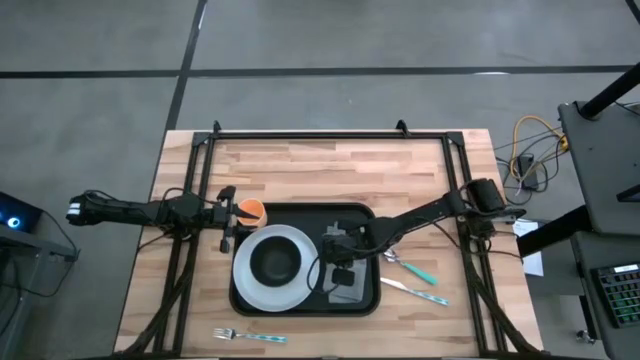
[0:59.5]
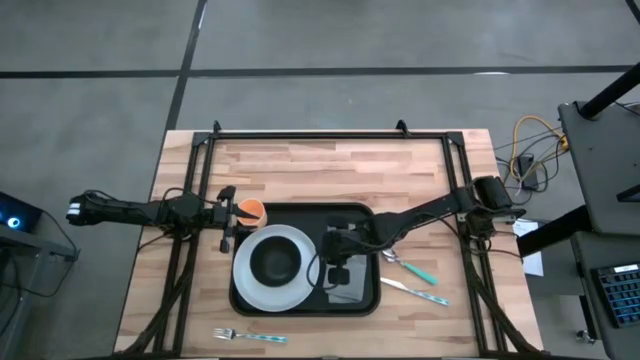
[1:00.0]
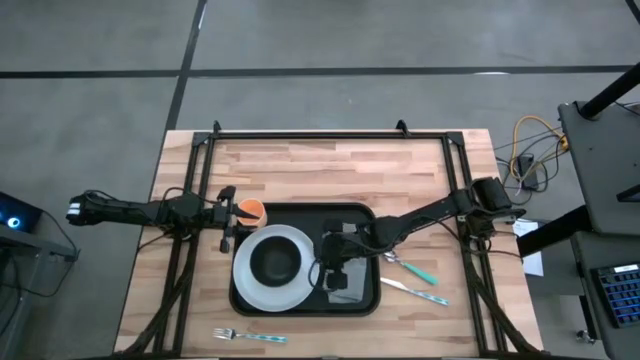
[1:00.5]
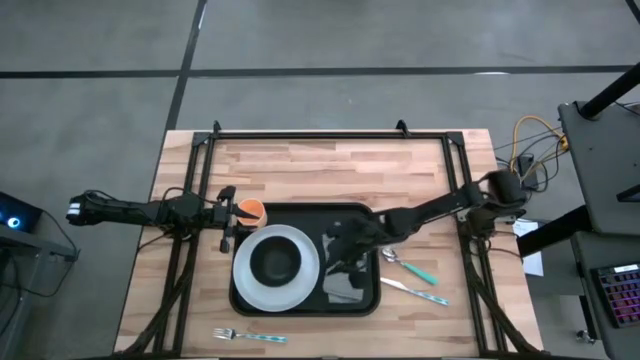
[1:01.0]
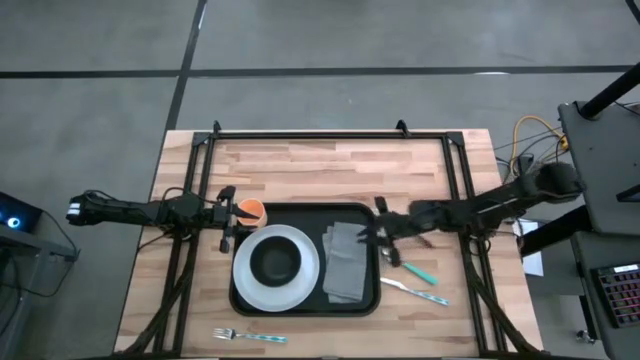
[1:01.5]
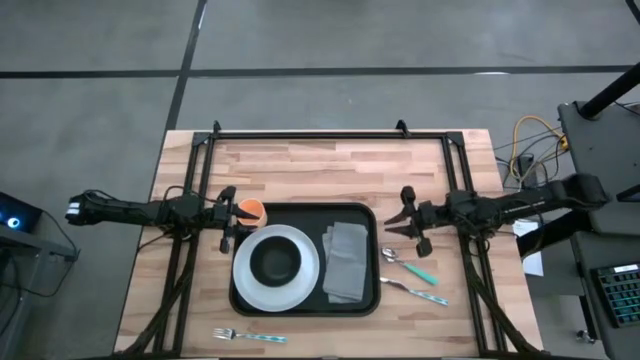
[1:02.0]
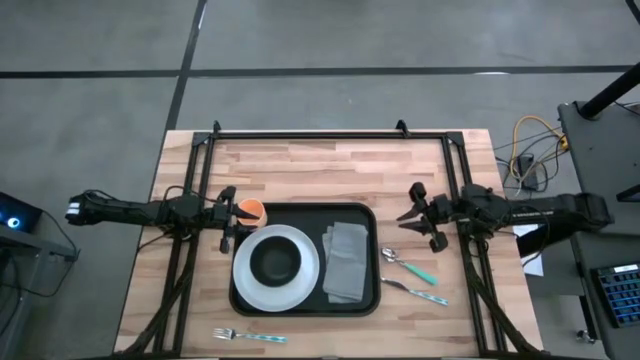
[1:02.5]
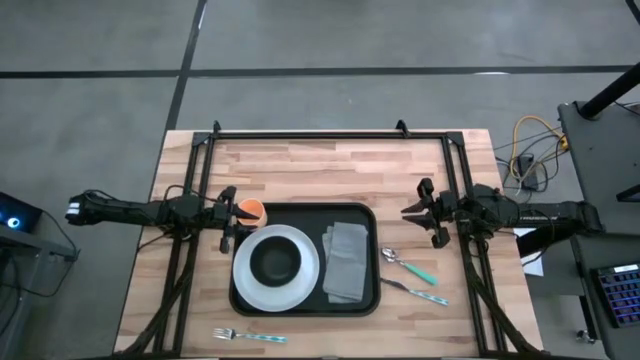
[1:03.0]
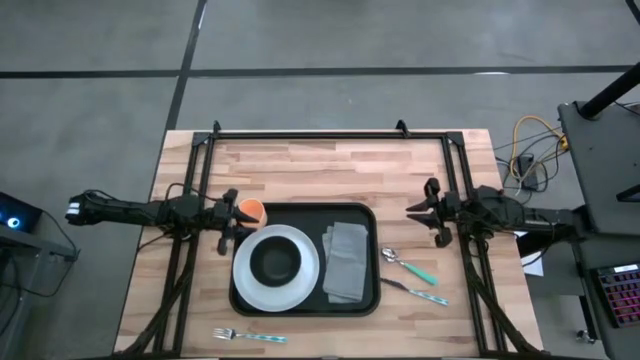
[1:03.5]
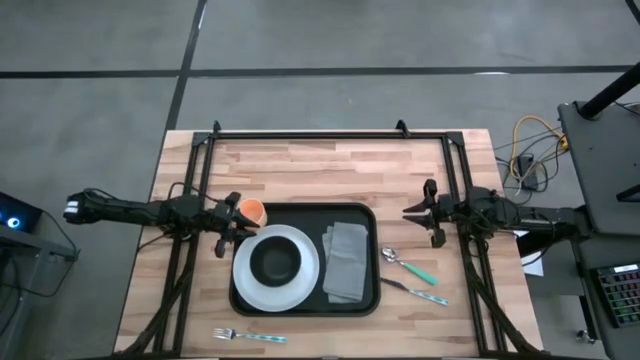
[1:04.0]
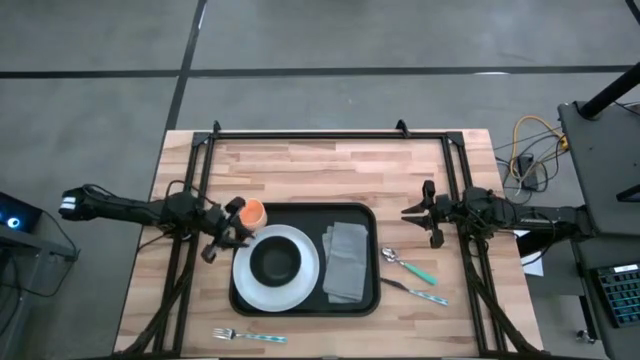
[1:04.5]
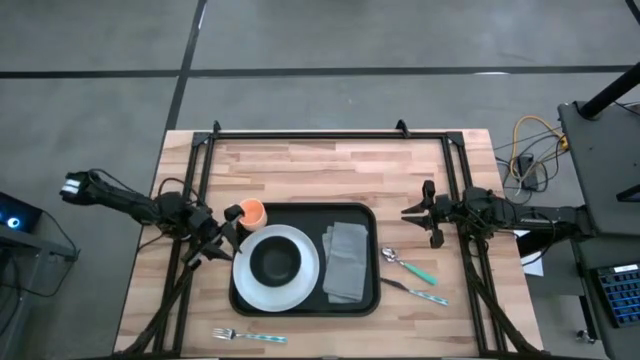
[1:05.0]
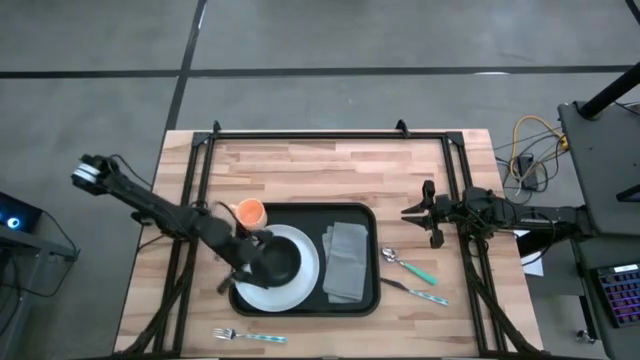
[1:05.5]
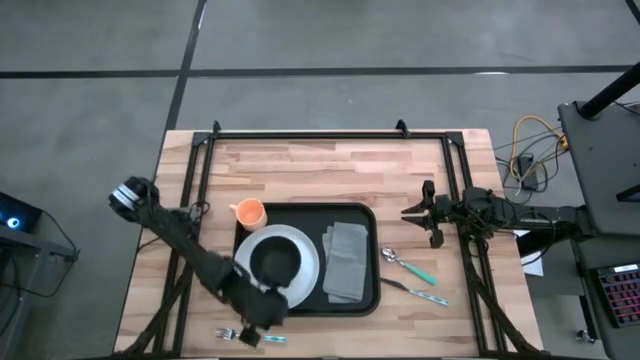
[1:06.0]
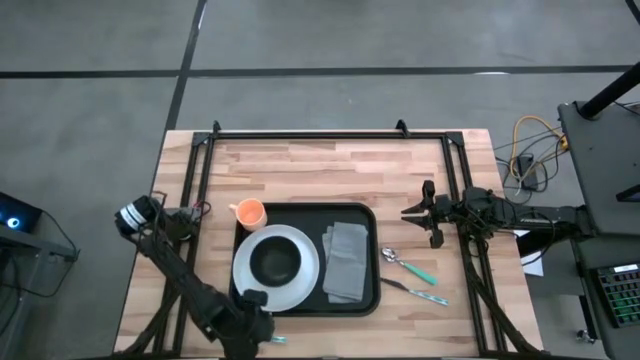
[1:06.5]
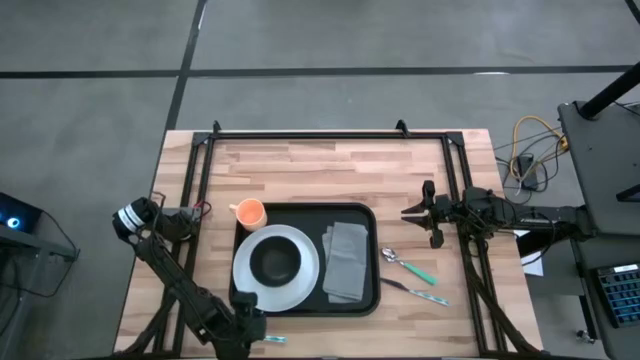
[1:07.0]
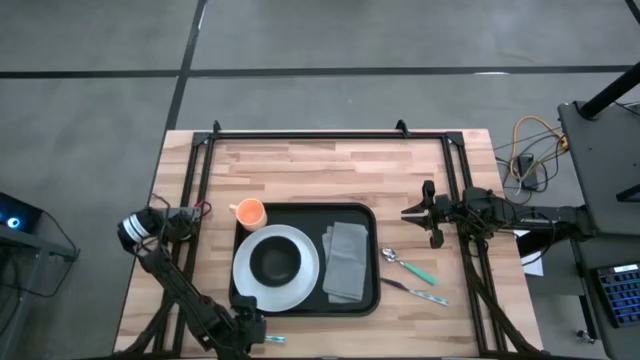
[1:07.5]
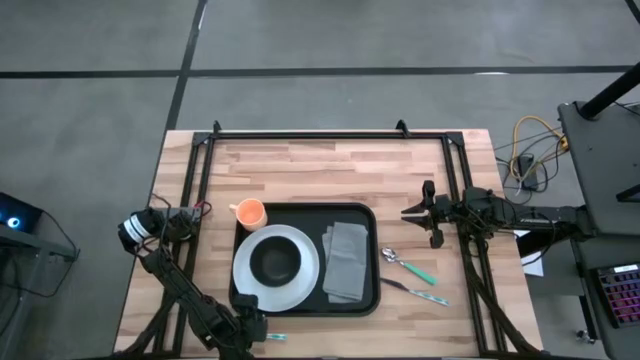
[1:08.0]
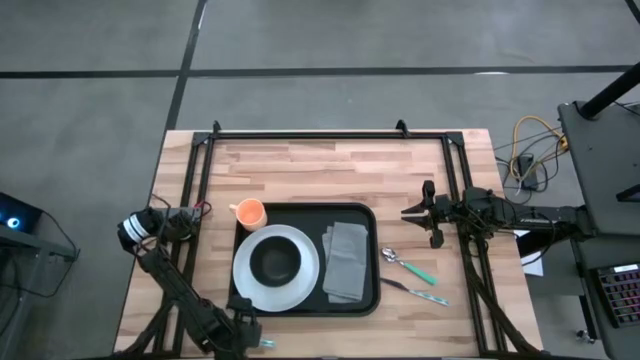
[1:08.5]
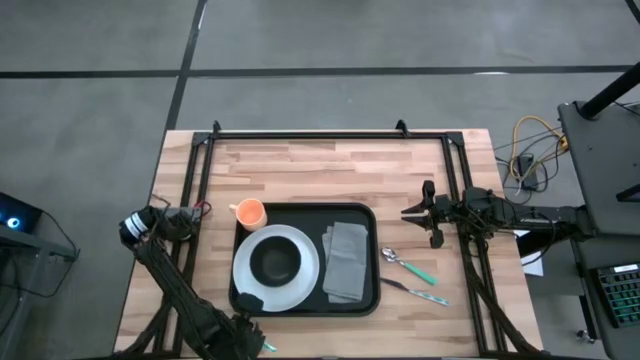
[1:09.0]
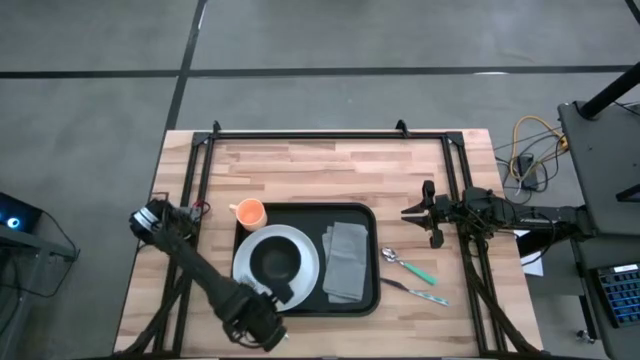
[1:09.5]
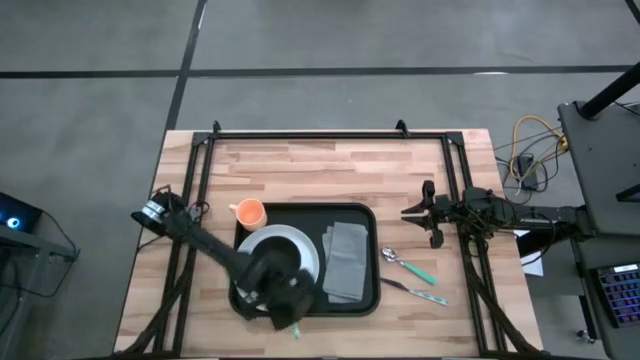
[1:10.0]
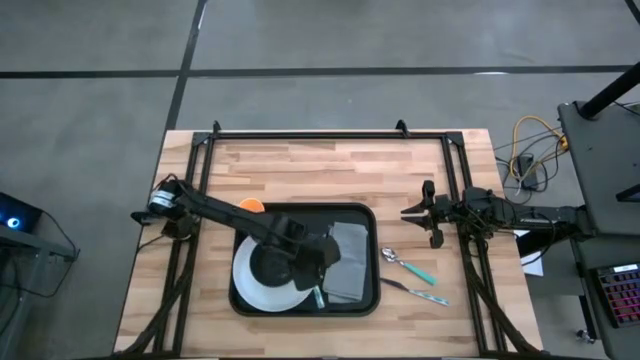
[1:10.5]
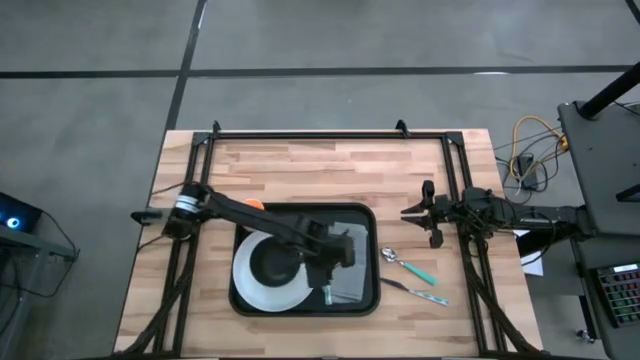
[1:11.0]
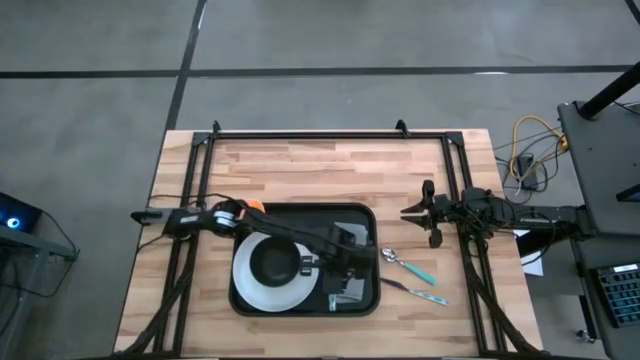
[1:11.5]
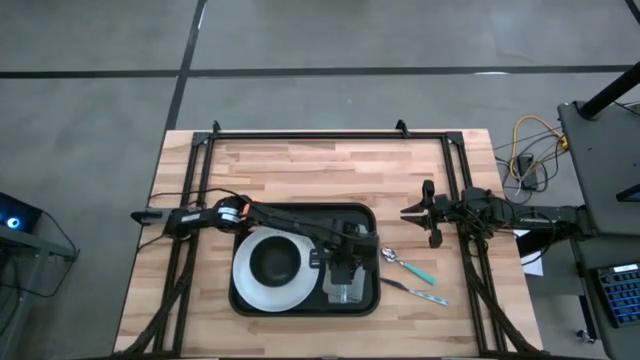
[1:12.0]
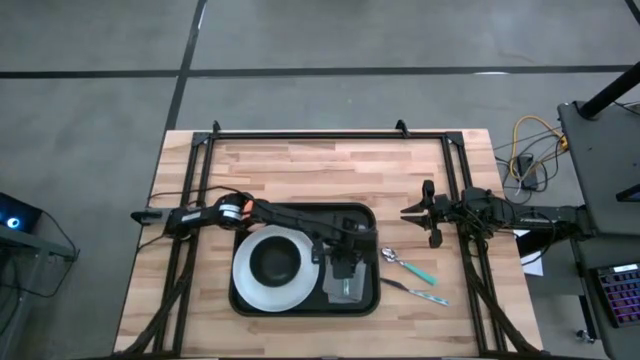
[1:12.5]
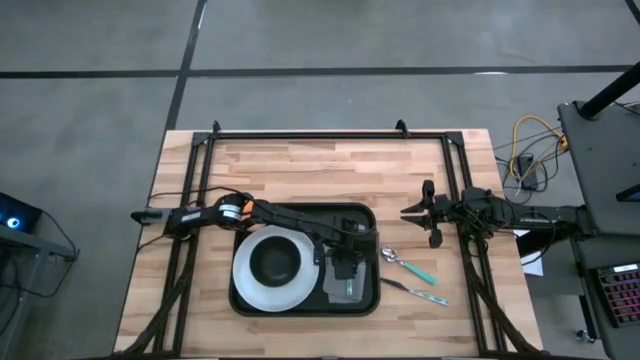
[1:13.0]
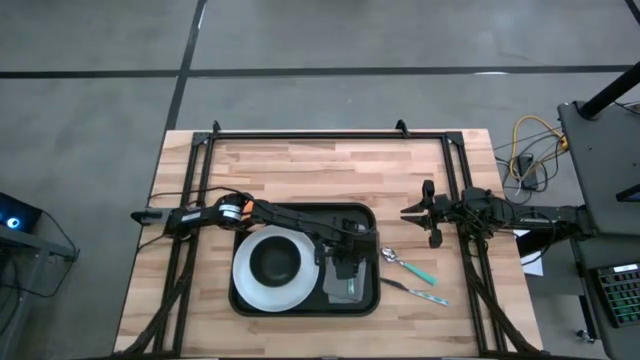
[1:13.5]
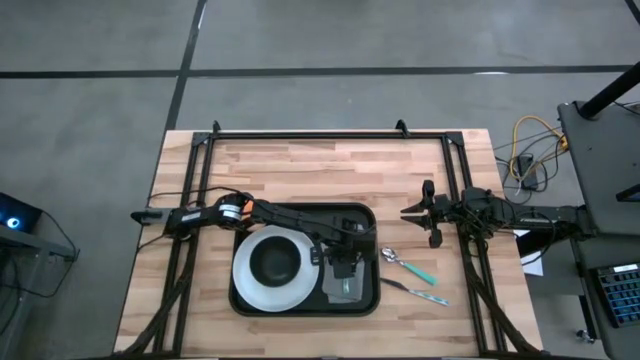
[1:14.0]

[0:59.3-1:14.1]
Task: Set up tray
Put the fork on the table napkin

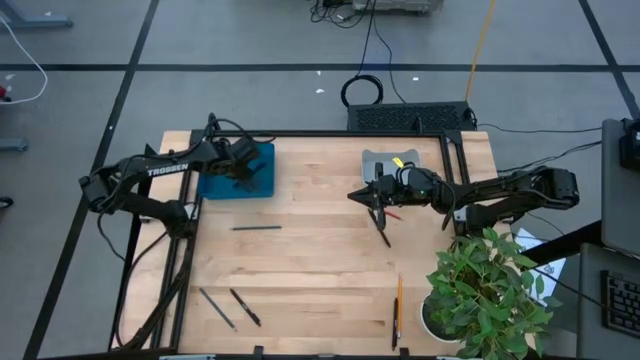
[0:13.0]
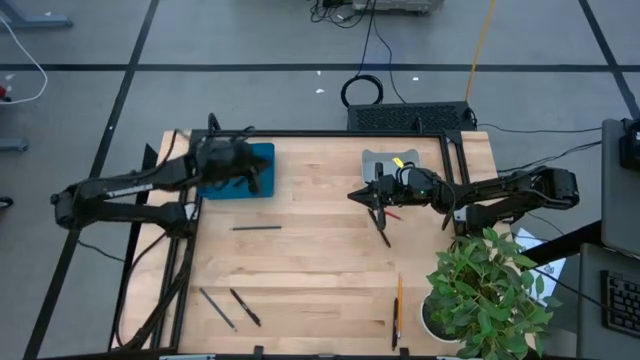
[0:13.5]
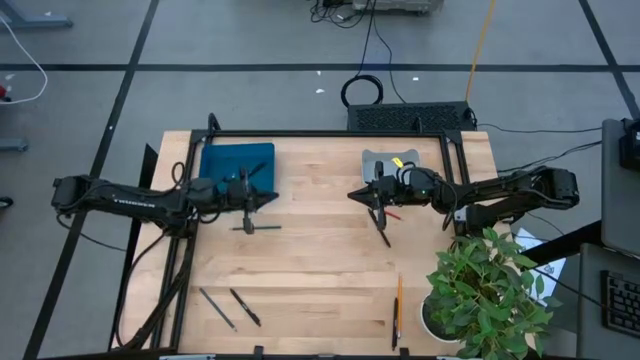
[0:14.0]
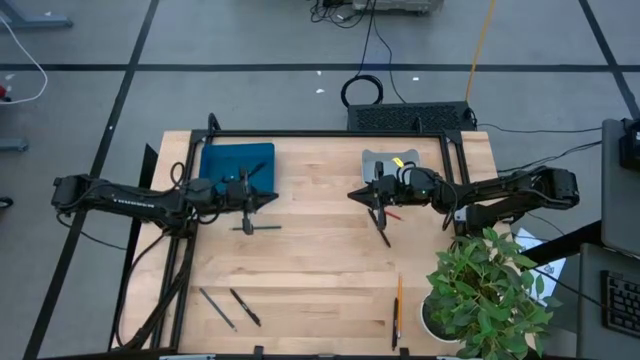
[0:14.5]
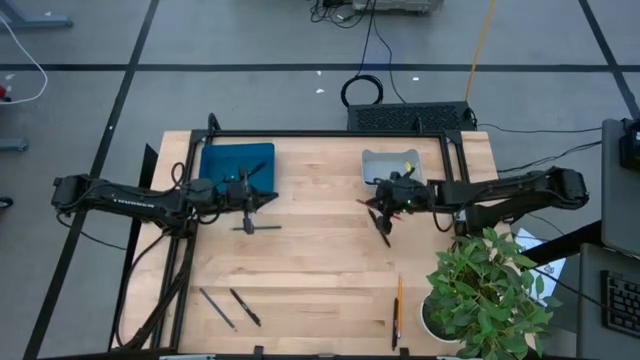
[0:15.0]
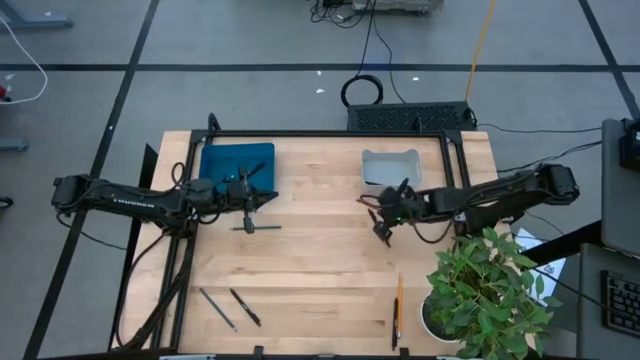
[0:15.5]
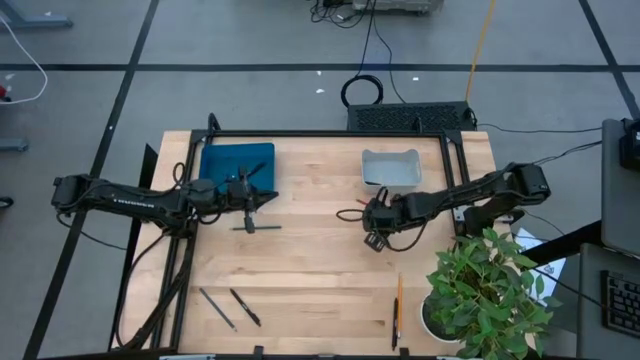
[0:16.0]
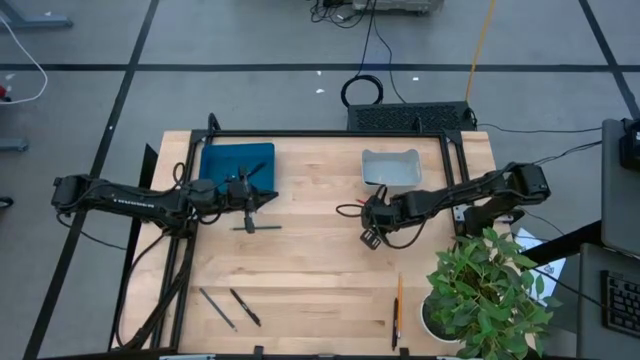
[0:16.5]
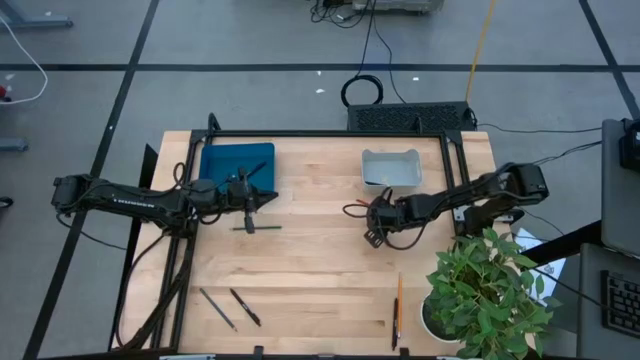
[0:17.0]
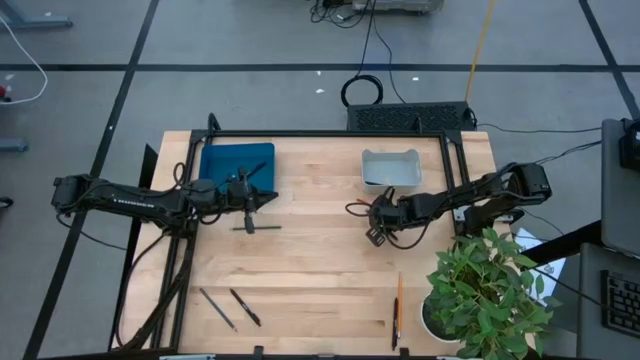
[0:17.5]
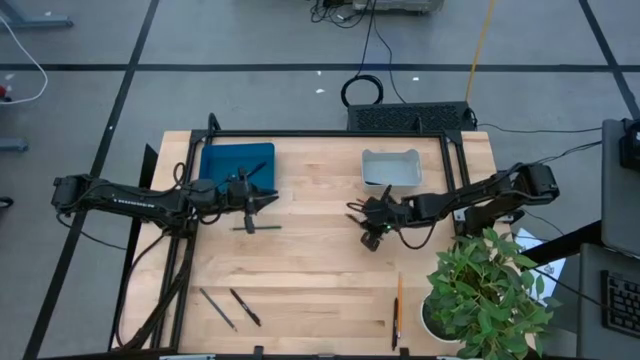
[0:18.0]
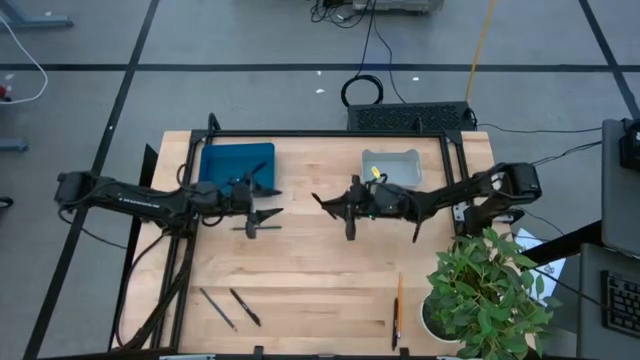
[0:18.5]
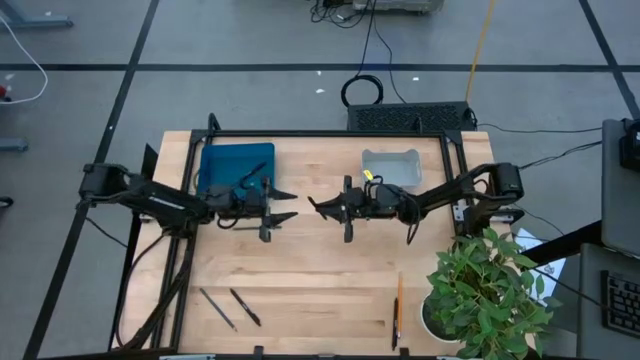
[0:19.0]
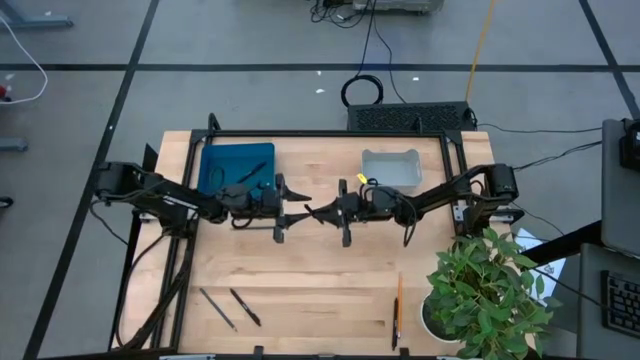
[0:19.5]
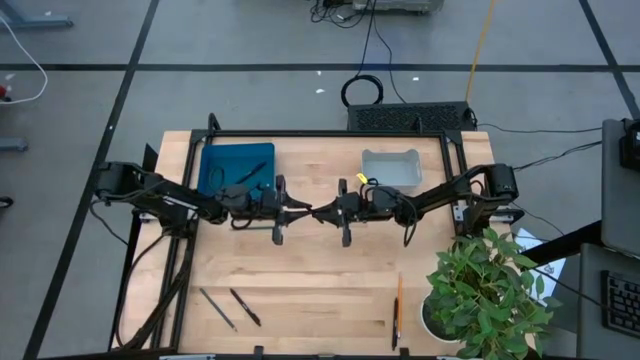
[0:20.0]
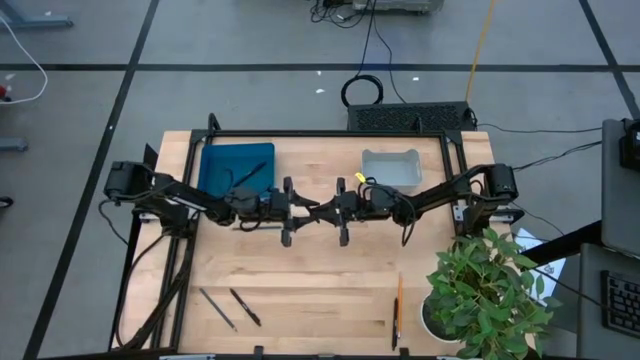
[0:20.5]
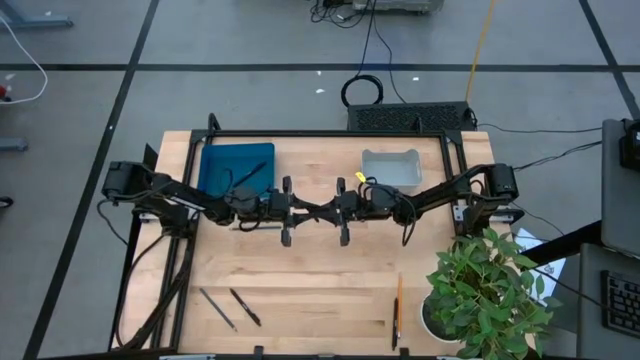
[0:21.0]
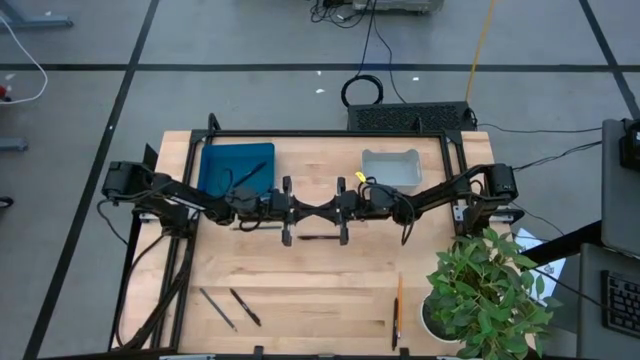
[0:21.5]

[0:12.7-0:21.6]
Task: Sort pens & pencils
Put the black pen into the blue bin
